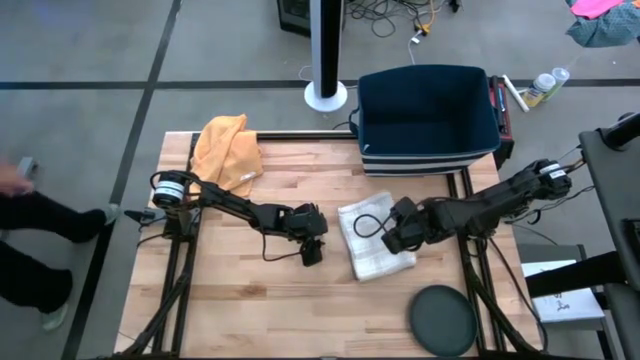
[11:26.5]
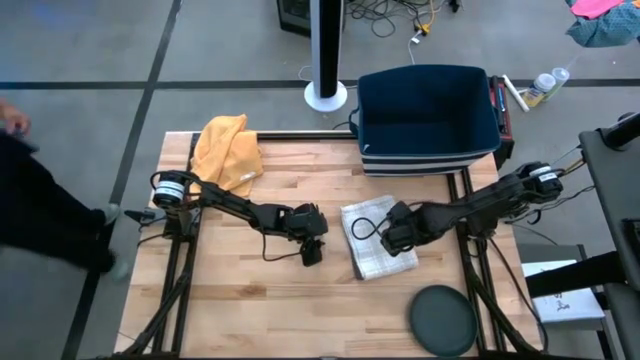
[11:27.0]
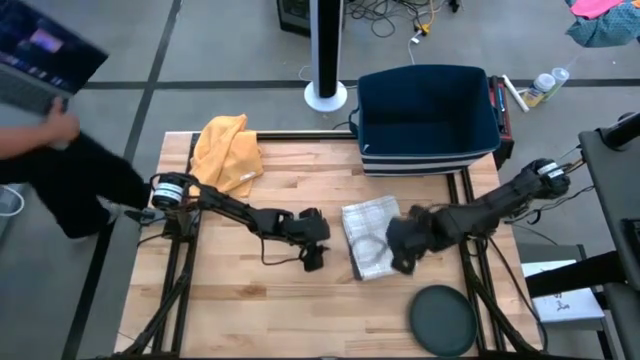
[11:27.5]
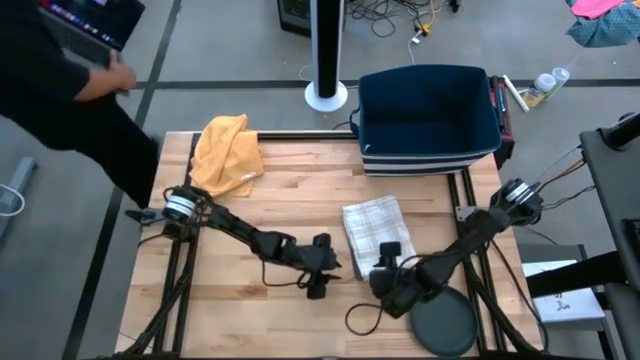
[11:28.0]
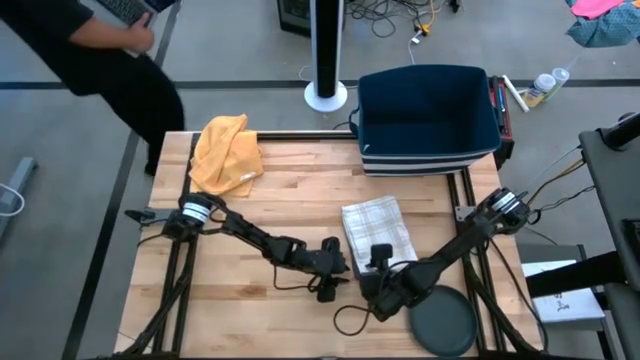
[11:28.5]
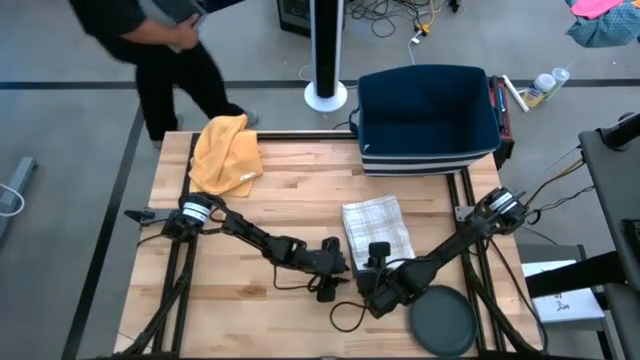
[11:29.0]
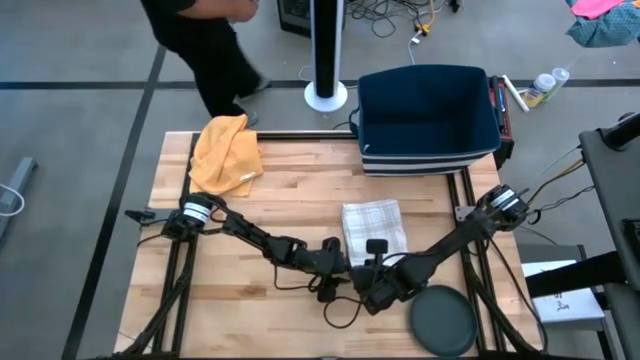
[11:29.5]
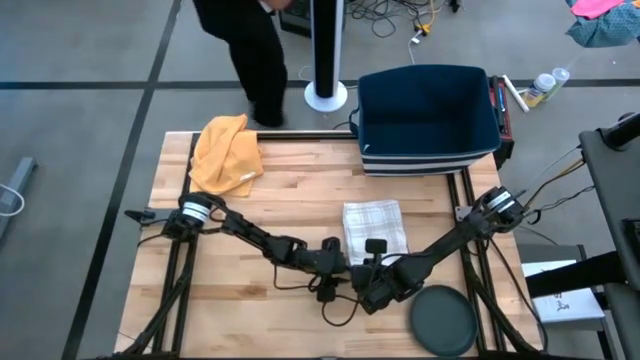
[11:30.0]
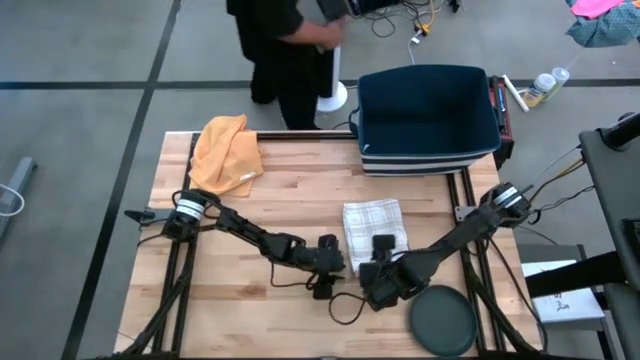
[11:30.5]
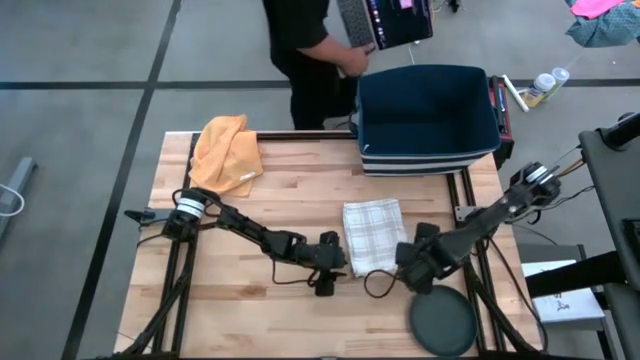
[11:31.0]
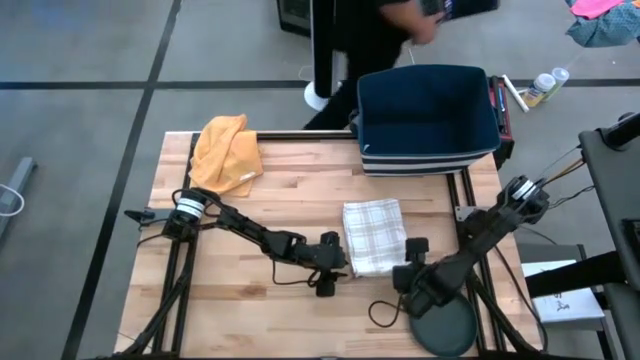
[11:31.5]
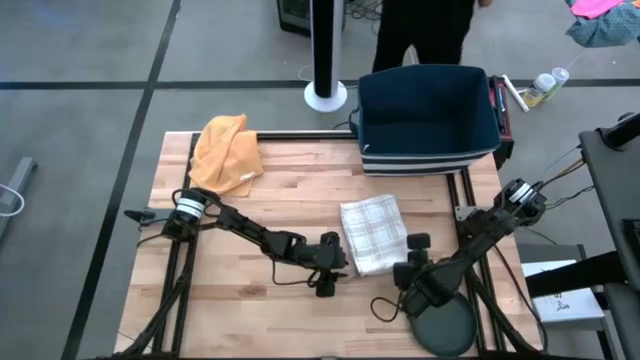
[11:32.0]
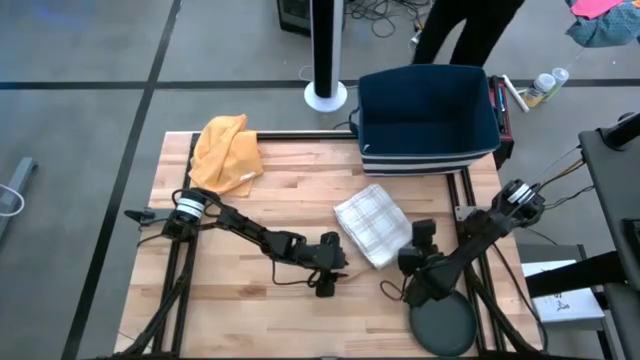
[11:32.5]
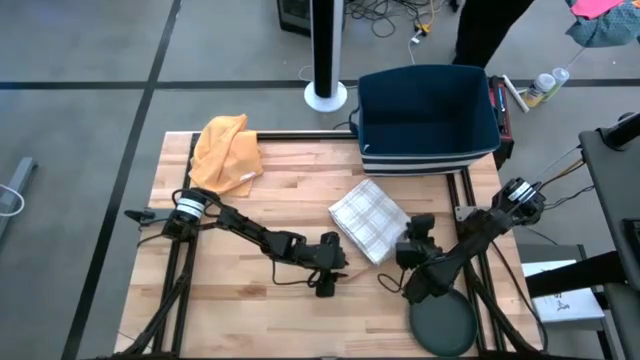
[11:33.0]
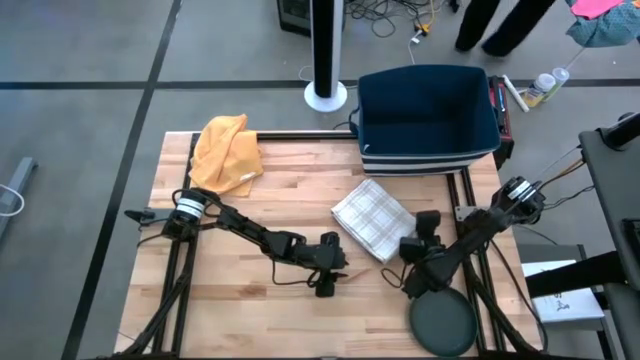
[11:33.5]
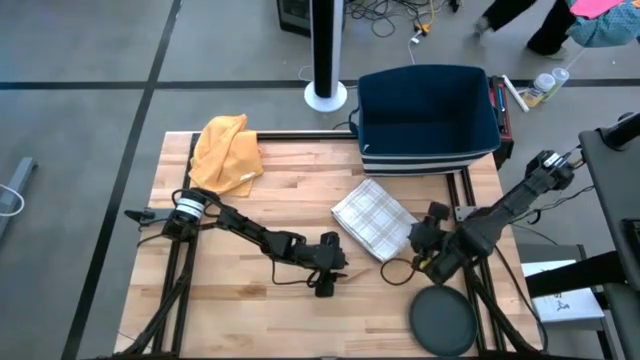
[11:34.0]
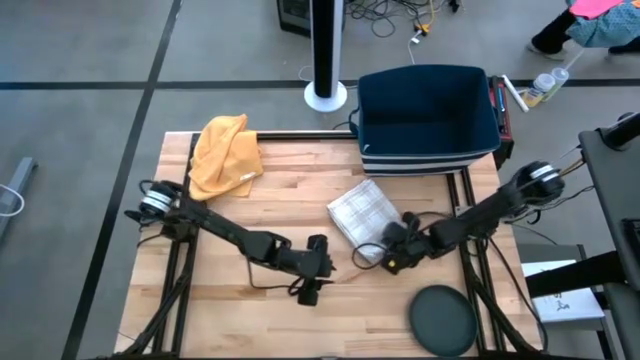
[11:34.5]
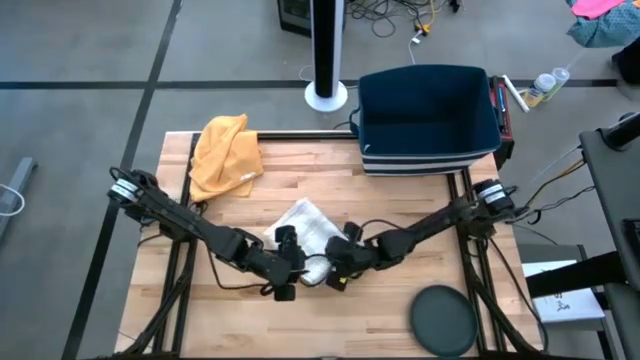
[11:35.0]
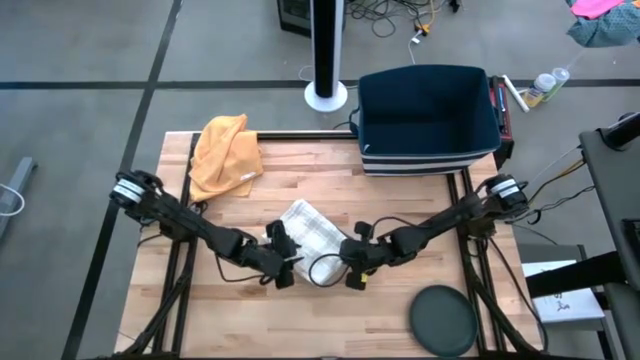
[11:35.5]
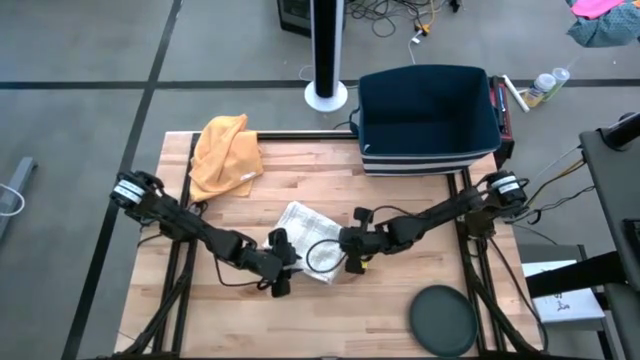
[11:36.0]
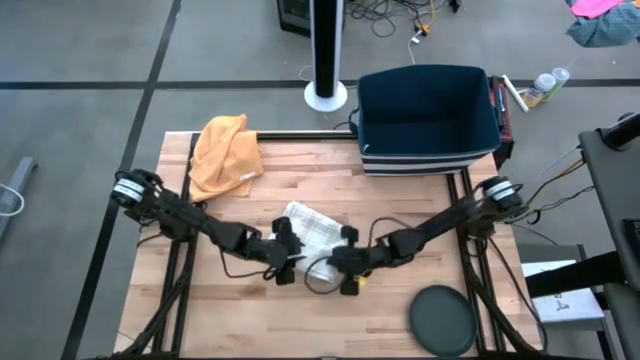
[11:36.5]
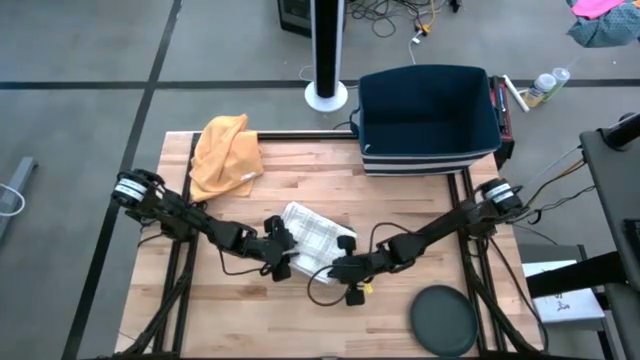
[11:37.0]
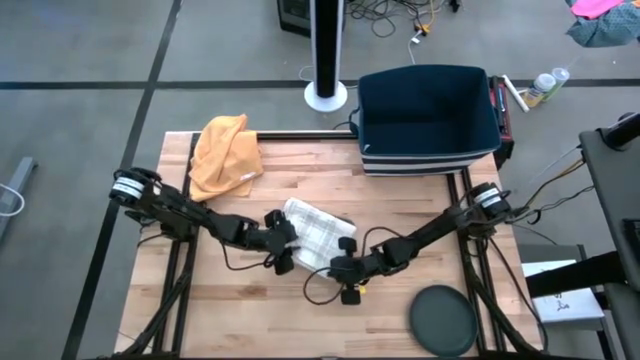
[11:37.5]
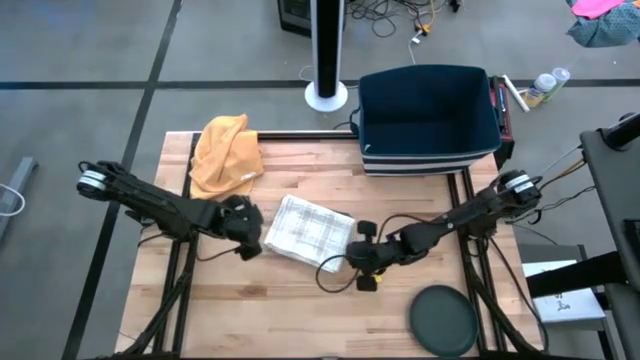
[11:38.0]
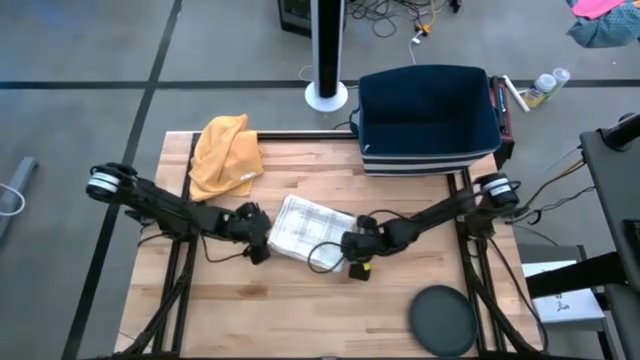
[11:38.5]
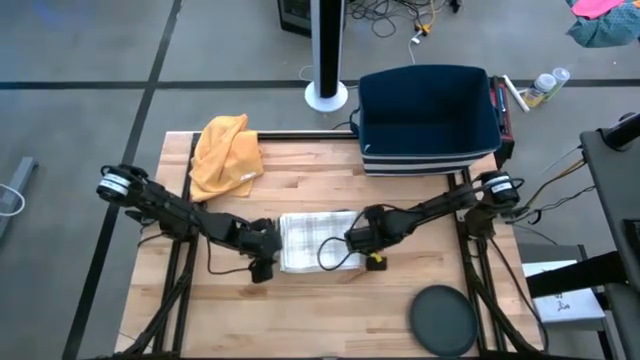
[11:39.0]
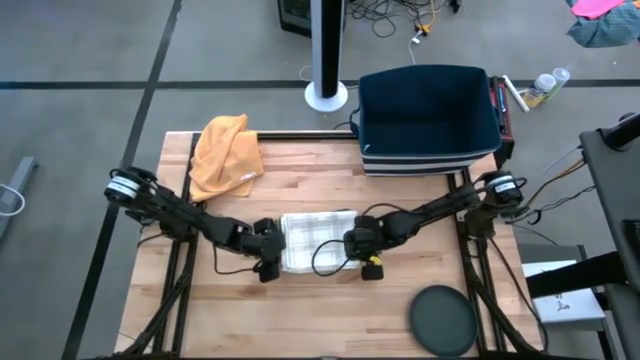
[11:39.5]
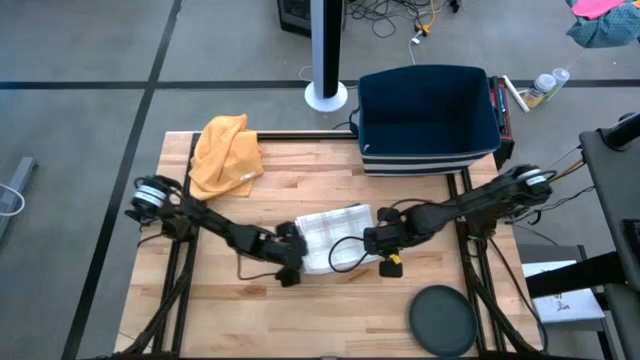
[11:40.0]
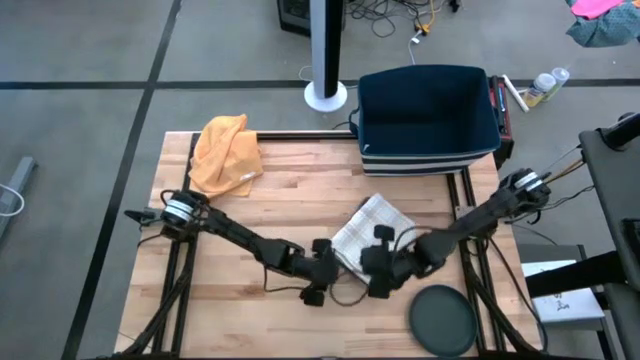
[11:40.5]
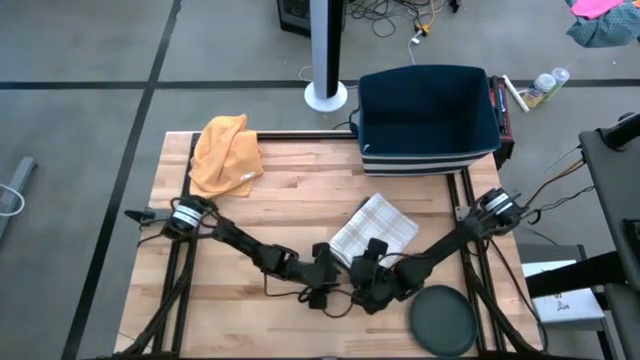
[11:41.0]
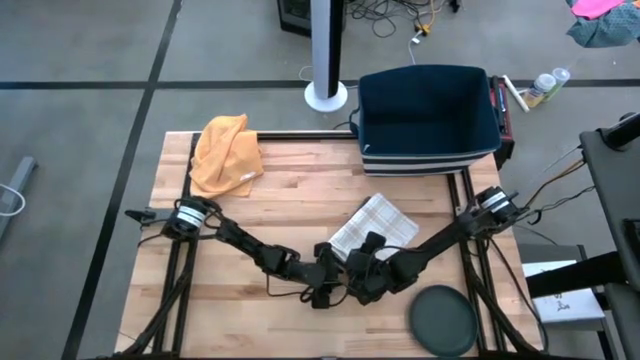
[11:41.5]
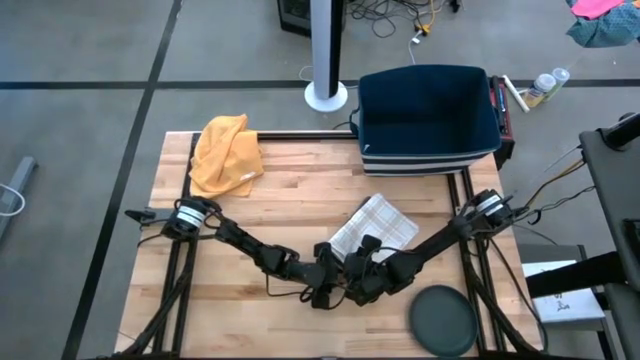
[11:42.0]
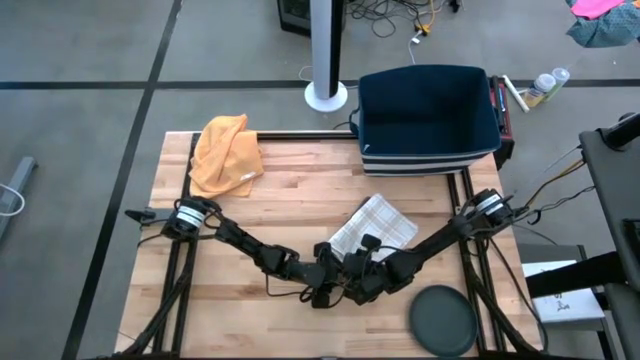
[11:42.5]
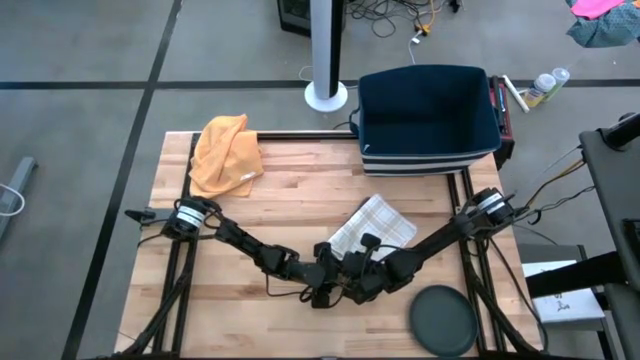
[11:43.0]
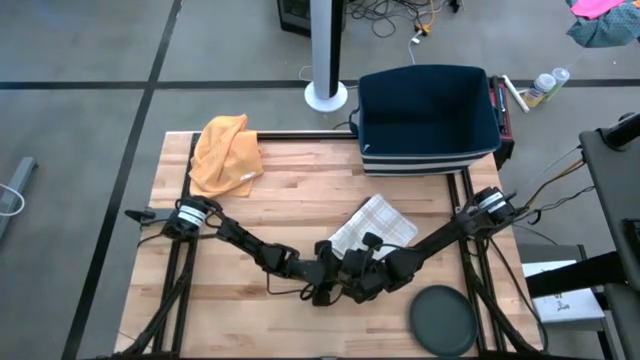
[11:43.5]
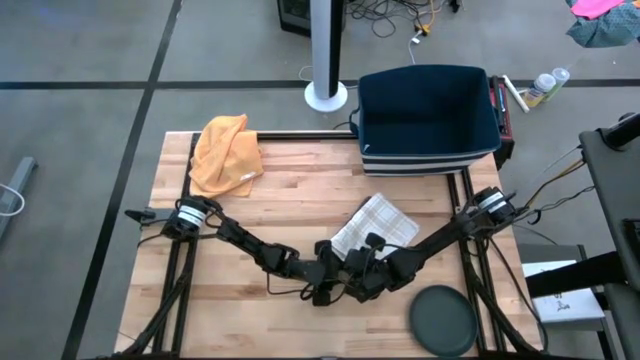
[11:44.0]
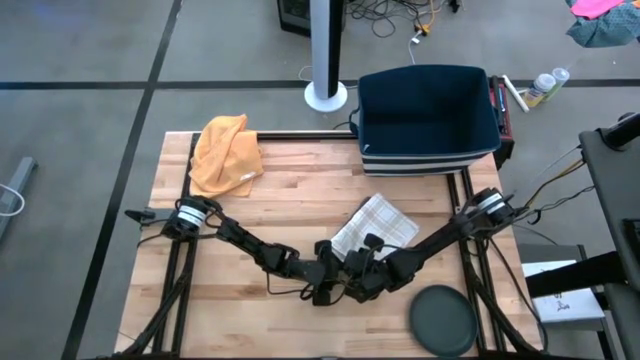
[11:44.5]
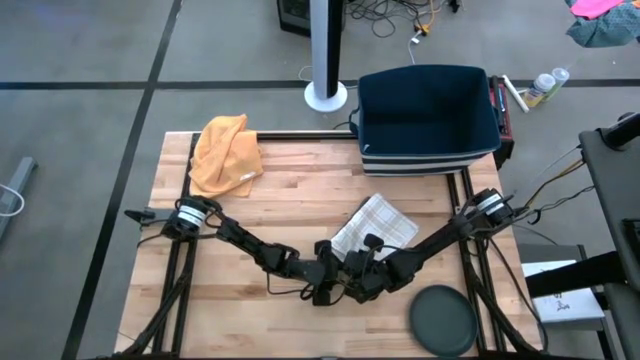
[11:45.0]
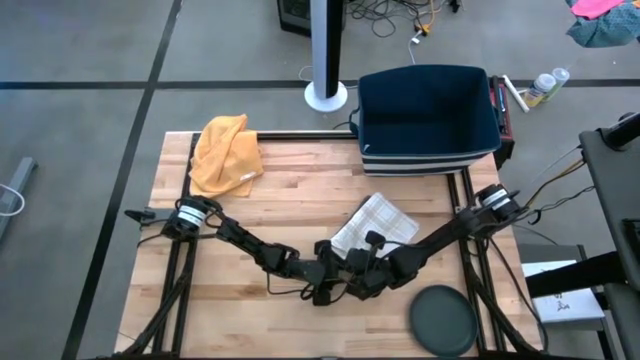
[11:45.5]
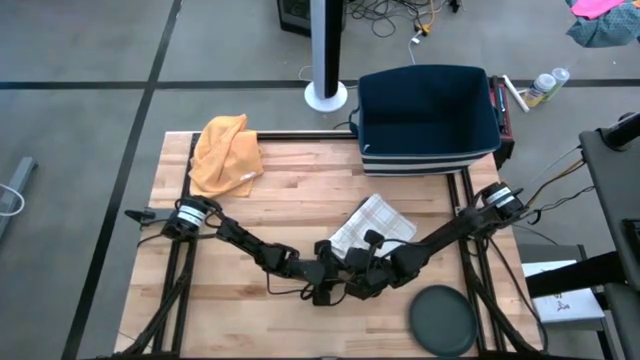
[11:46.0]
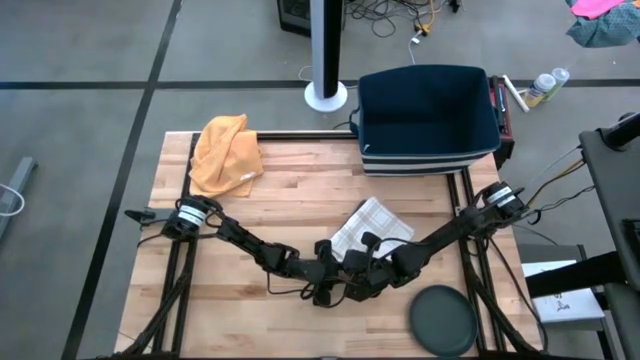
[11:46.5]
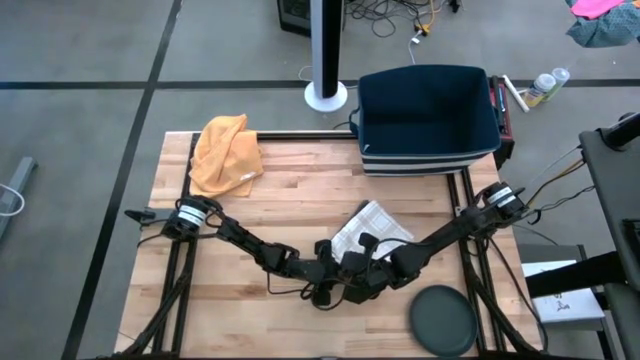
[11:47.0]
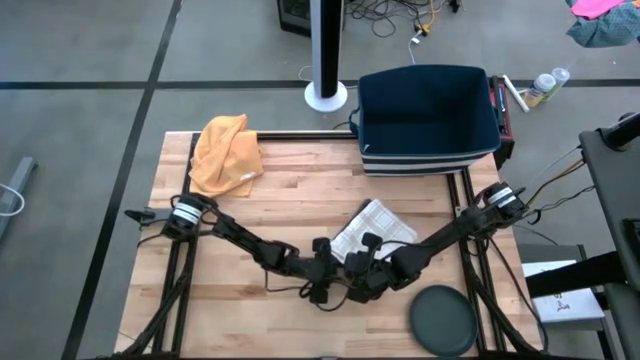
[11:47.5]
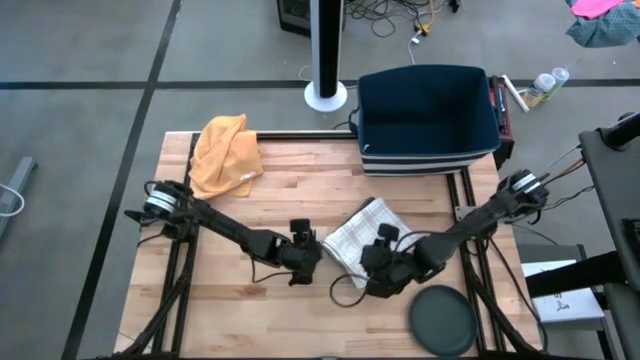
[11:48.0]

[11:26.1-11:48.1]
Task: Fold kitchen towel into neat rectangle
Stack the white patterned towel on top of the gray towel
